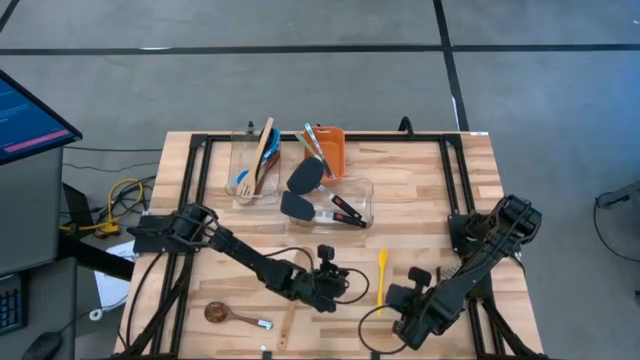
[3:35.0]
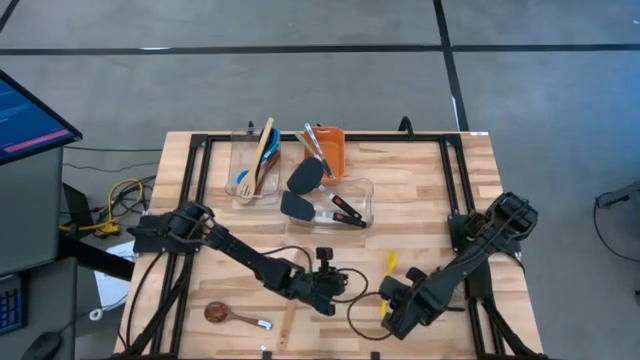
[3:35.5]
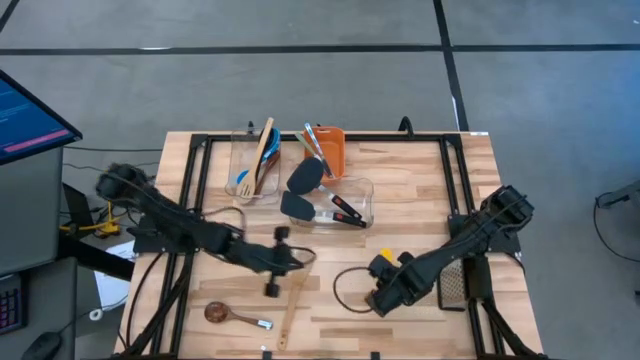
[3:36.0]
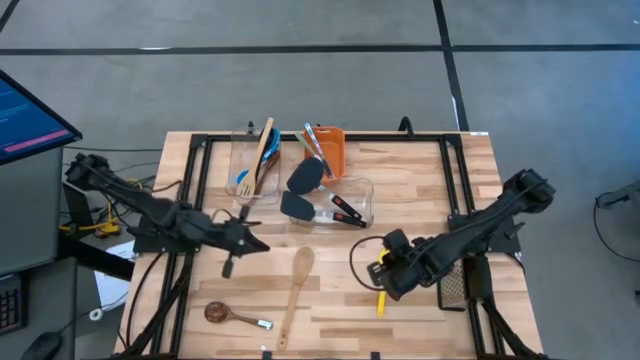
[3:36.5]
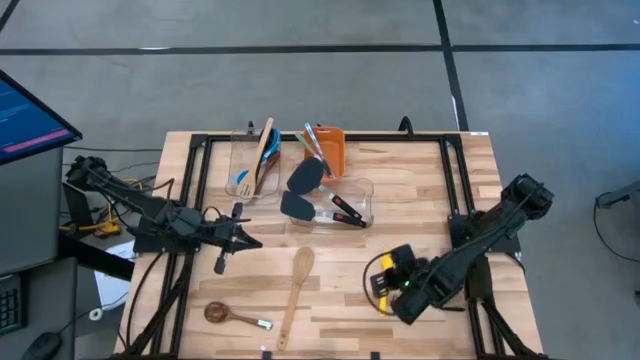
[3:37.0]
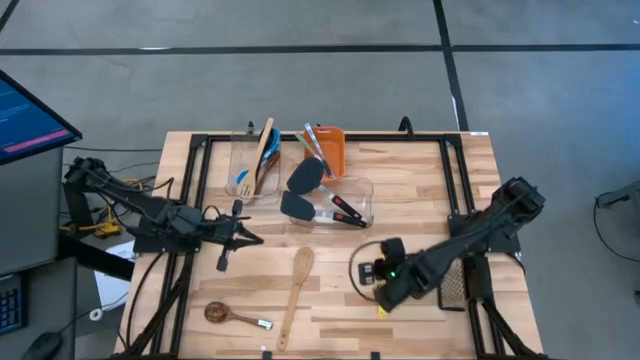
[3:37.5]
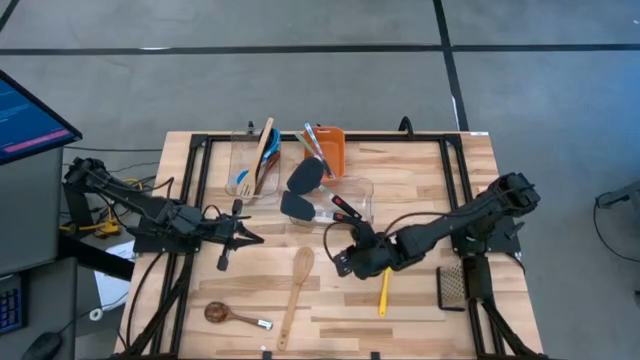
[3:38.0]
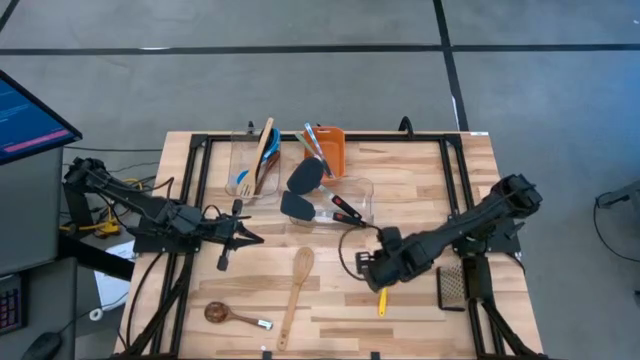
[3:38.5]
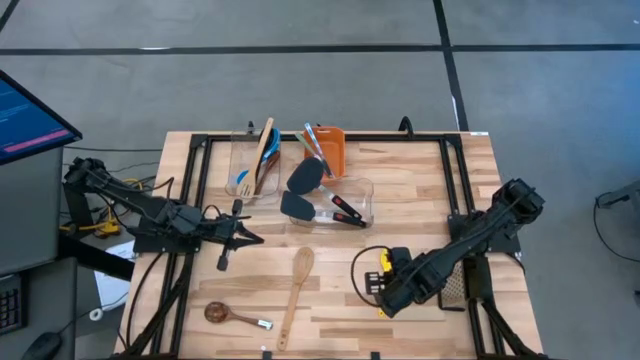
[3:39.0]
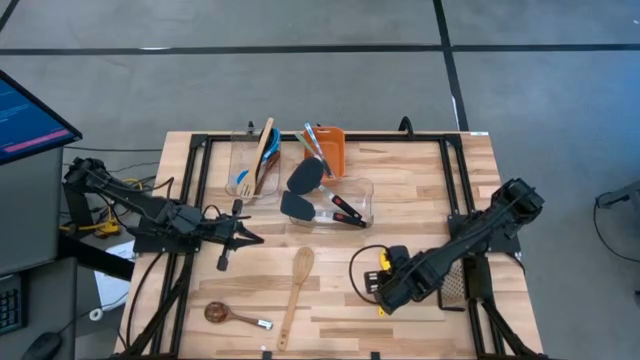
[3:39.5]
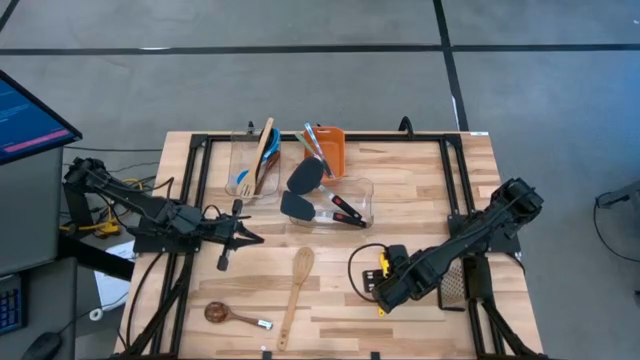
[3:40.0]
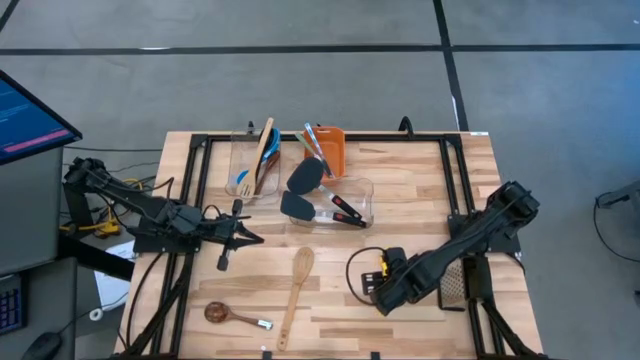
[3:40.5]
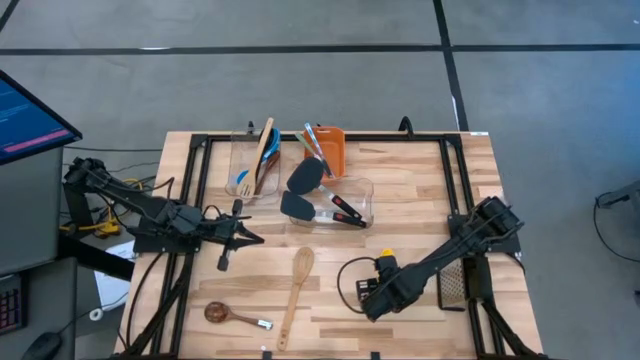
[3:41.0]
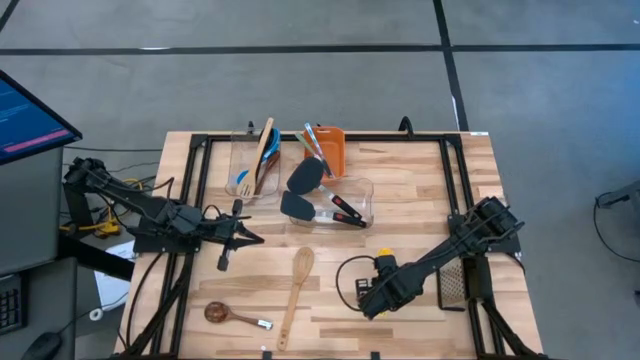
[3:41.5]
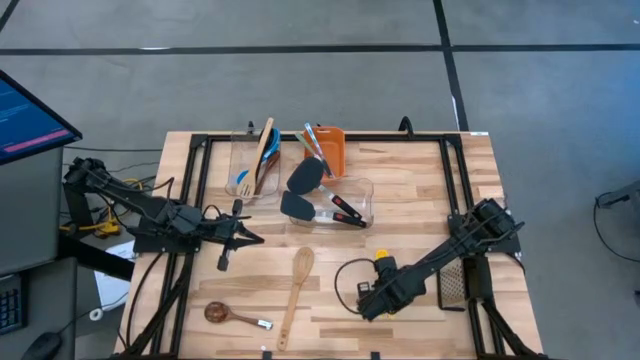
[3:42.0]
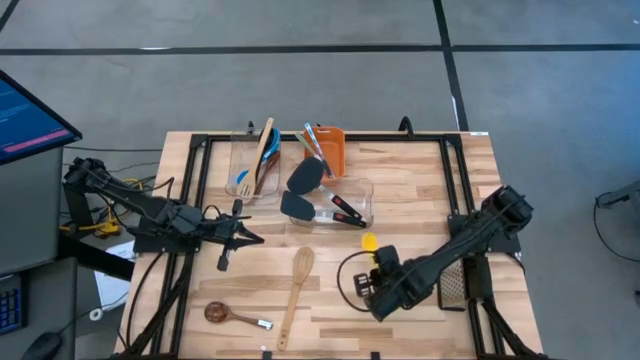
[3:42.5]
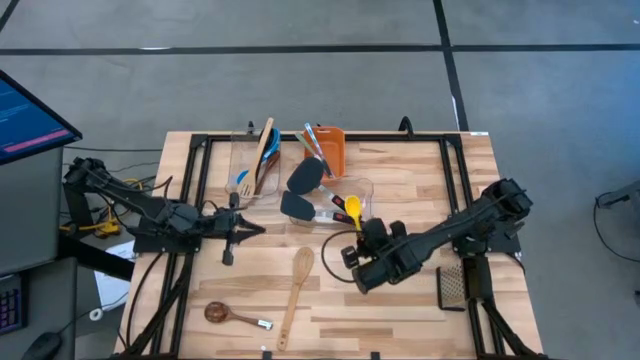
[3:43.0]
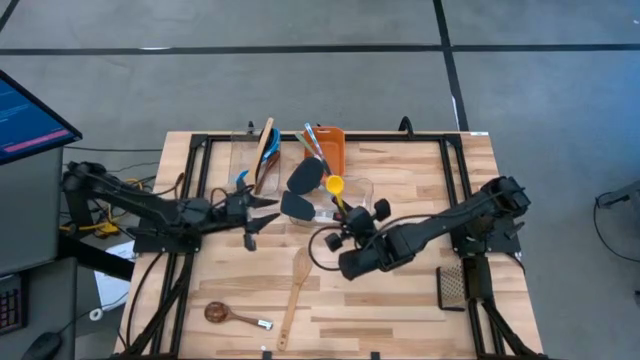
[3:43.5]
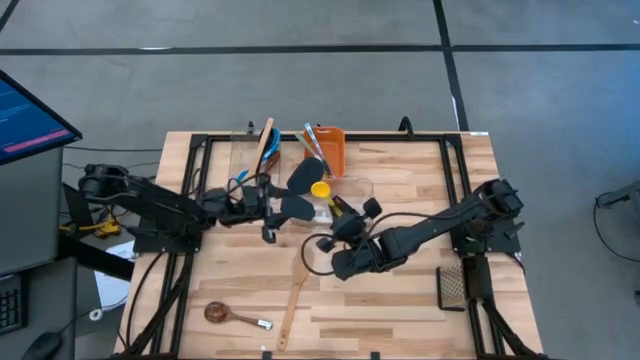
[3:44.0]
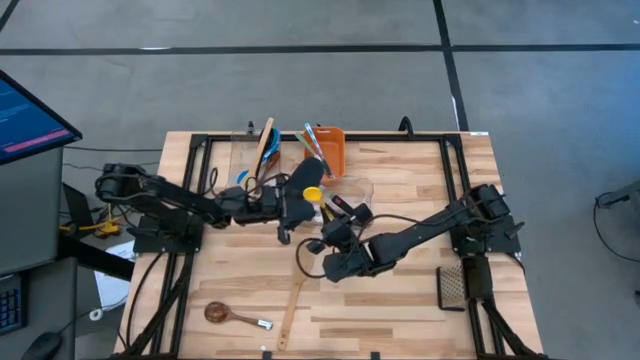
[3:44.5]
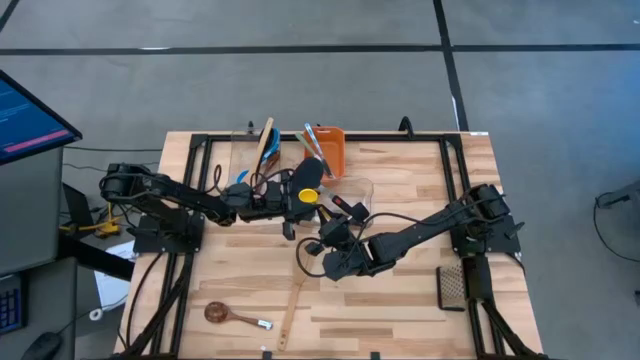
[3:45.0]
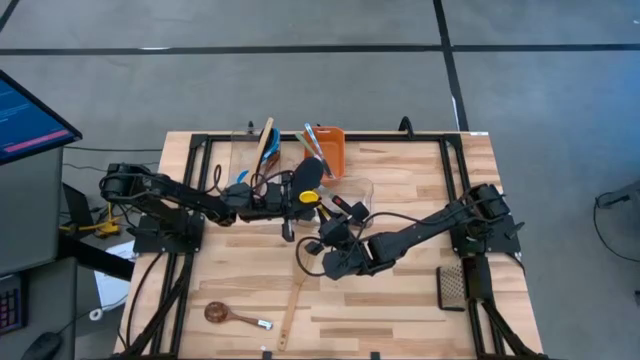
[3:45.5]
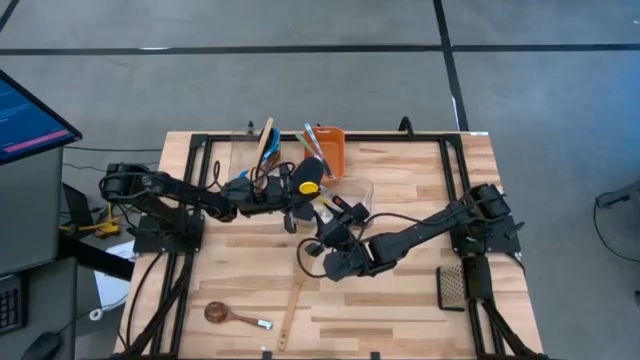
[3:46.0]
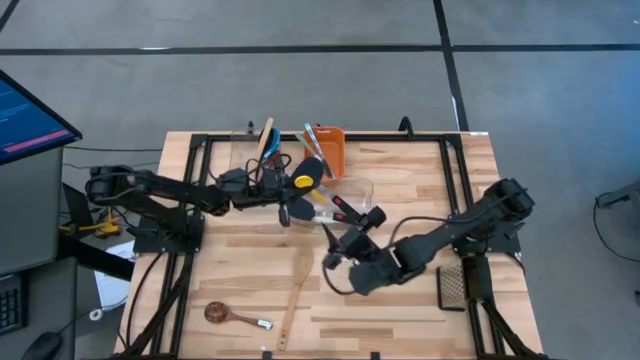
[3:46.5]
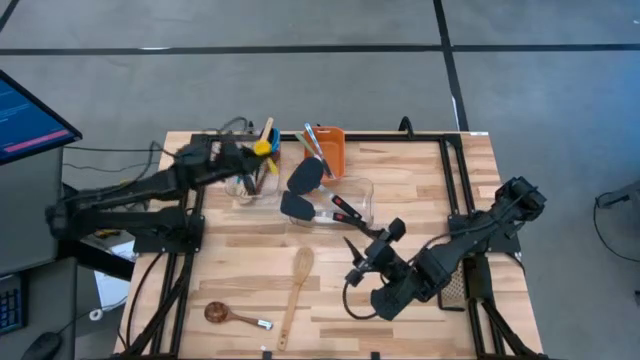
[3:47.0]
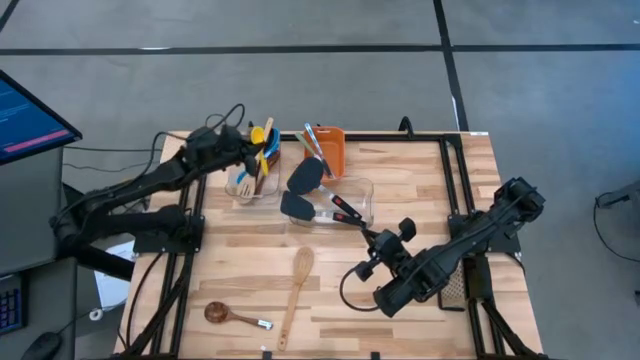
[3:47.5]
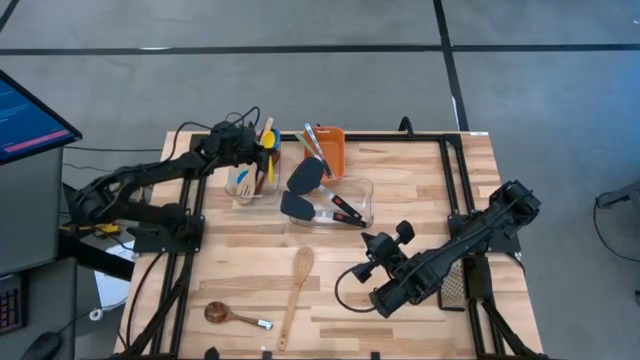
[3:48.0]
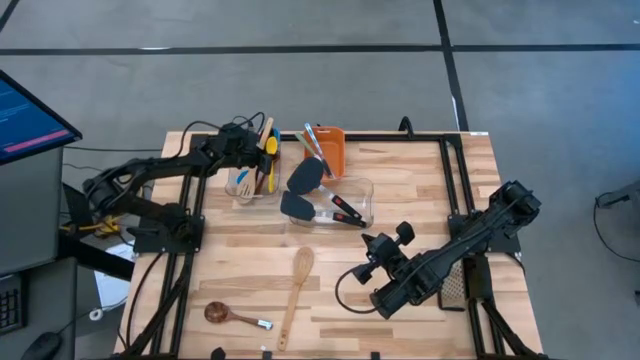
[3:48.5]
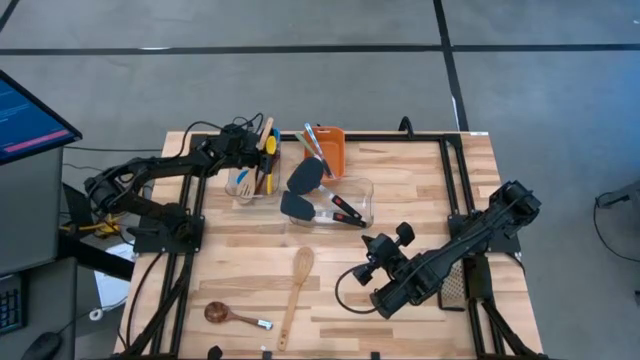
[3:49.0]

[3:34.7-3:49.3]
Task: Pick & Place Kitchen Items
Put the yellow serving spoon into the top transparent bin

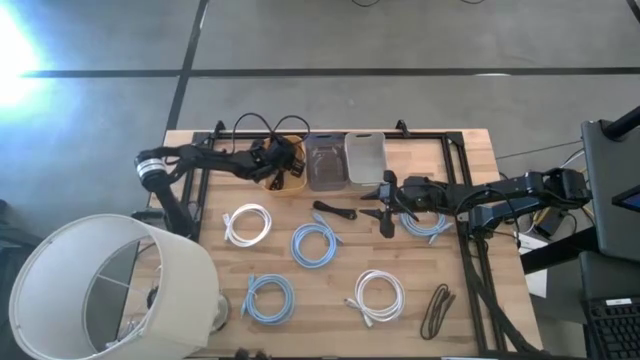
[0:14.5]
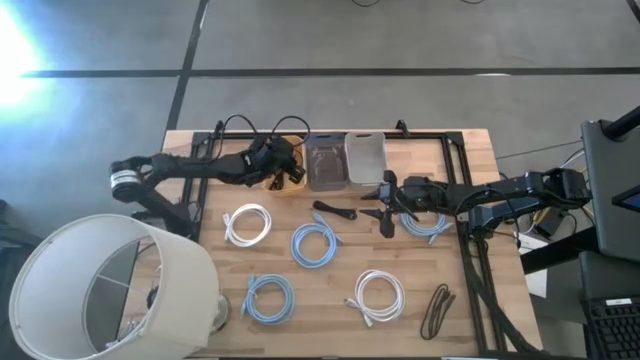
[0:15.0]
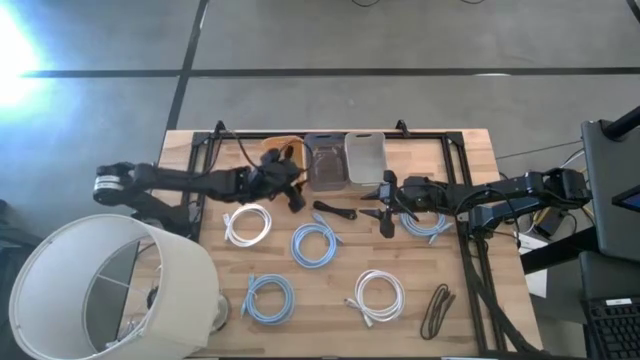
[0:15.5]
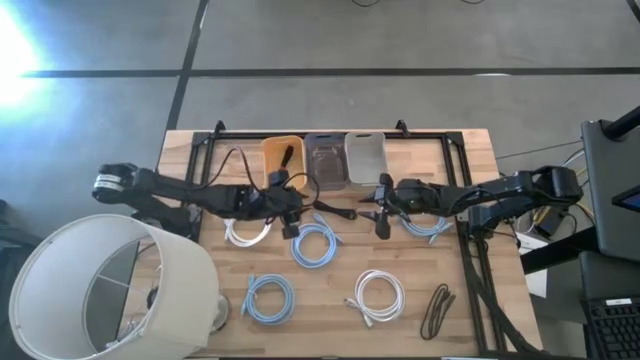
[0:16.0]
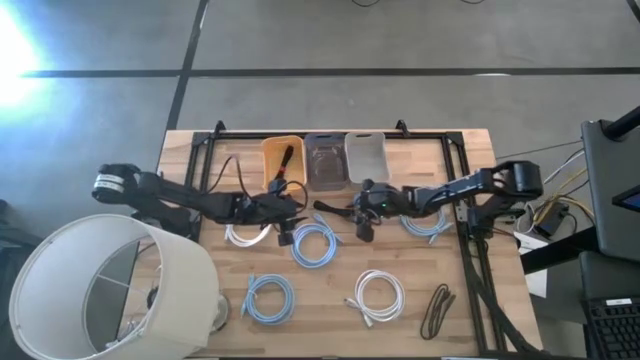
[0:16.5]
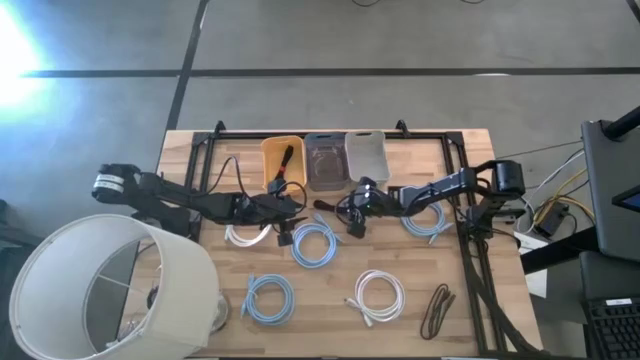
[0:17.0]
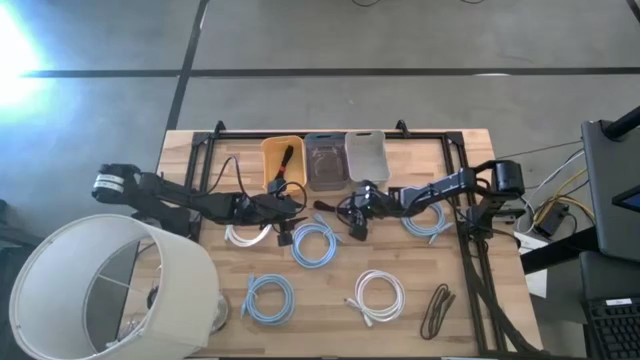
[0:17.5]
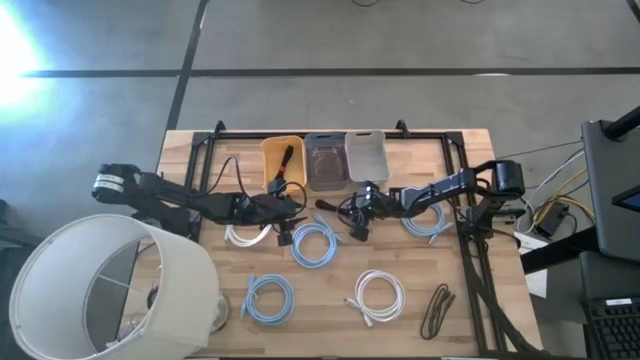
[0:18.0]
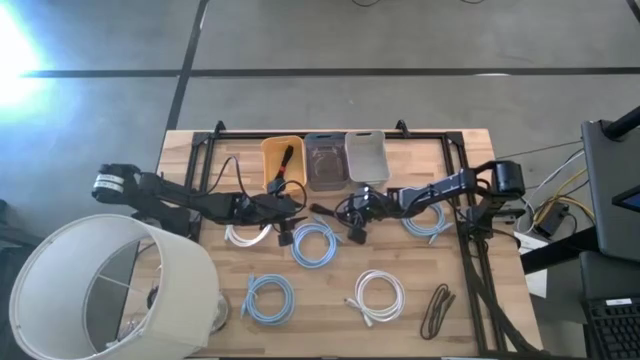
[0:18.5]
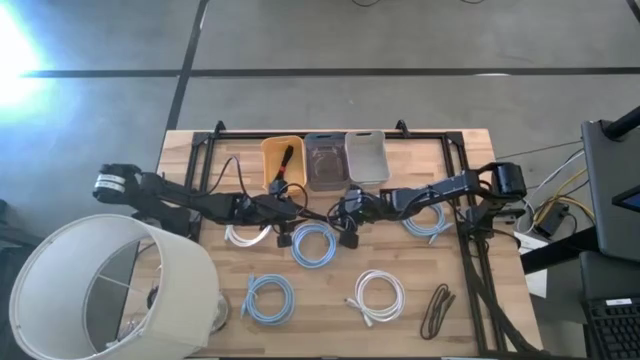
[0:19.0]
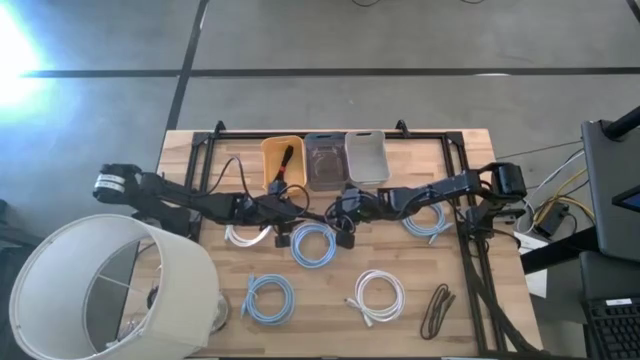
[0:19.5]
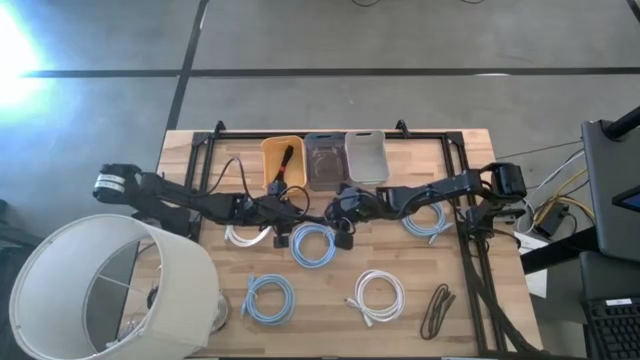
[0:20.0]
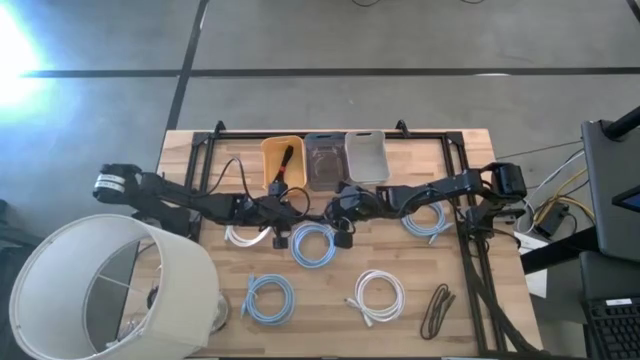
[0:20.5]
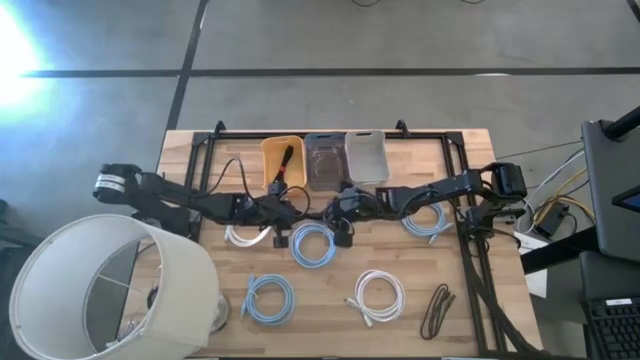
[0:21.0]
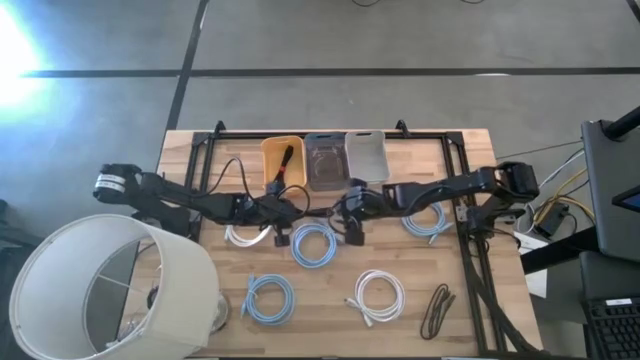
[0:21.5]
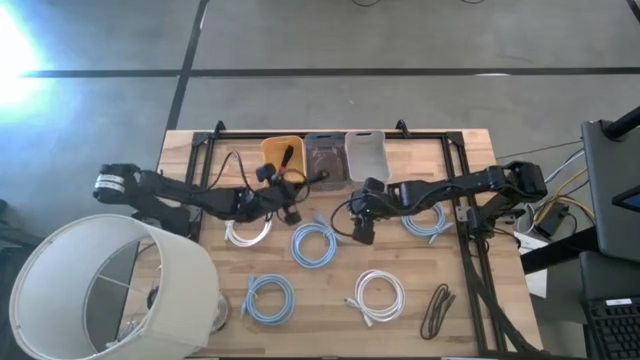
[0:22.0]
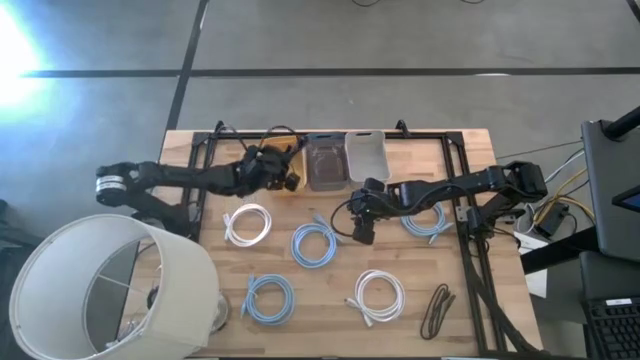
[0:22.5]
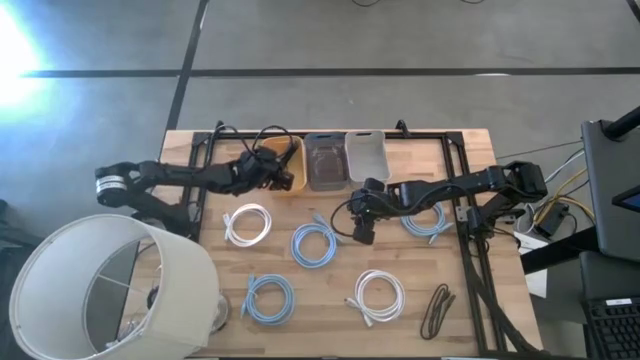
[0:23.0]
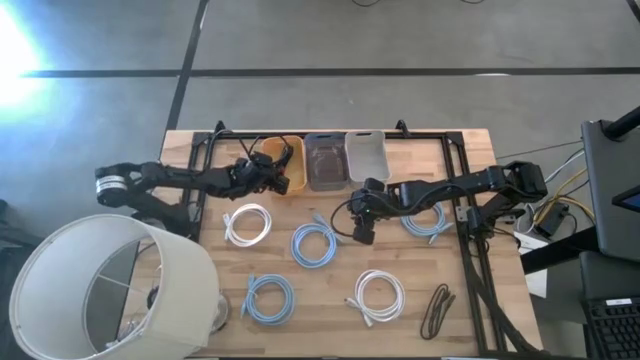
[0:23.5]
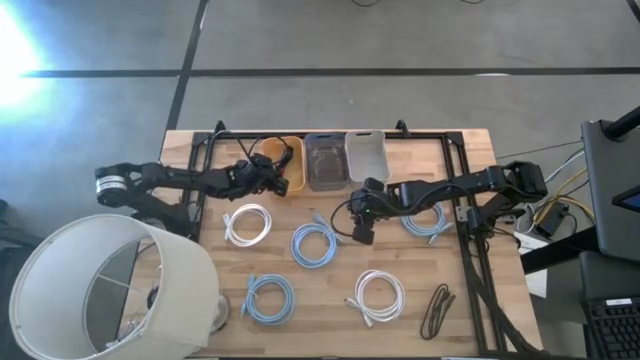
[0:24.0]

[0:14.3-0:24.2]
Task: Pick & Place USB Port
Put the top black usb cable into the yellow bin
